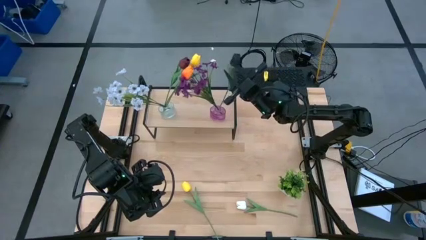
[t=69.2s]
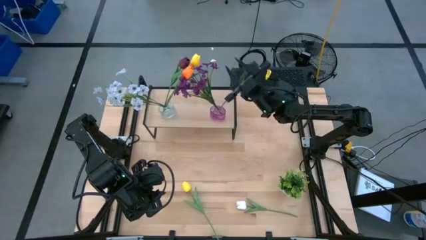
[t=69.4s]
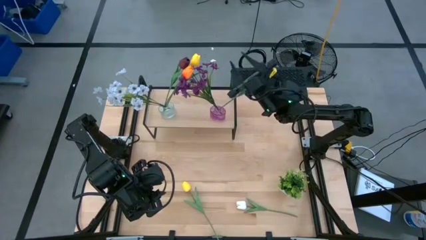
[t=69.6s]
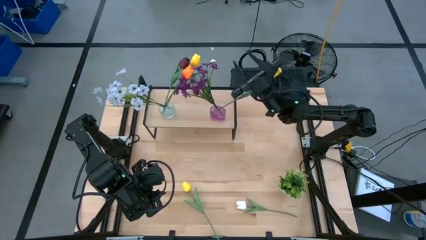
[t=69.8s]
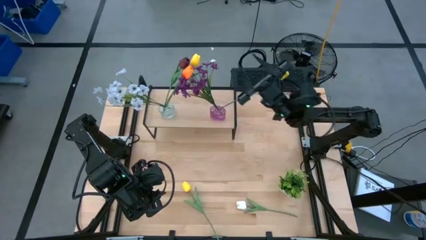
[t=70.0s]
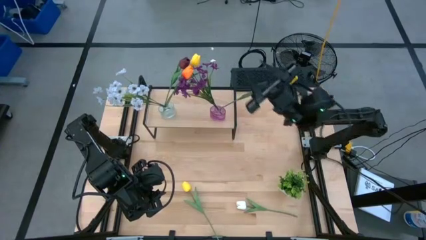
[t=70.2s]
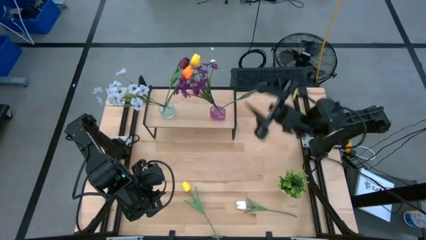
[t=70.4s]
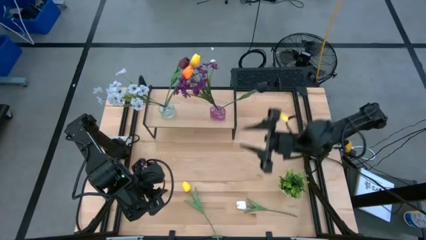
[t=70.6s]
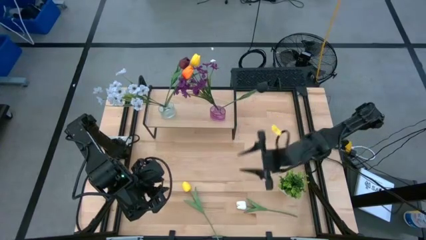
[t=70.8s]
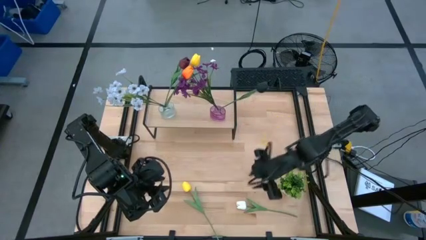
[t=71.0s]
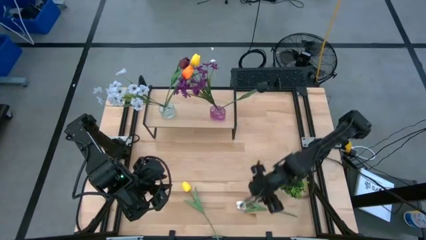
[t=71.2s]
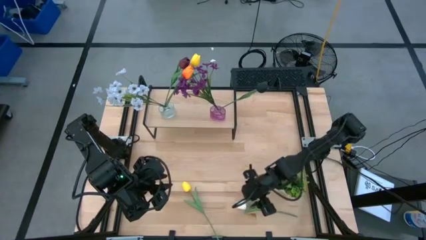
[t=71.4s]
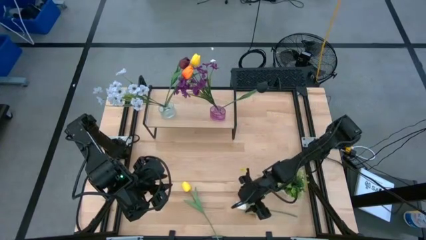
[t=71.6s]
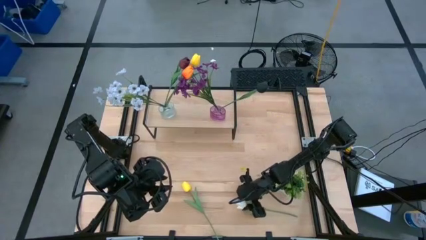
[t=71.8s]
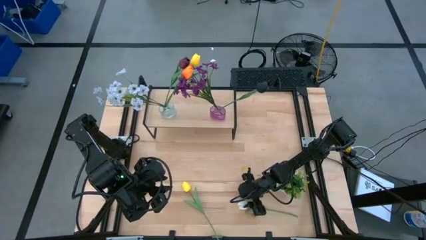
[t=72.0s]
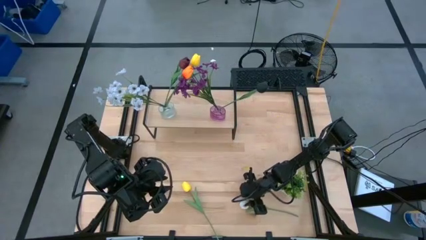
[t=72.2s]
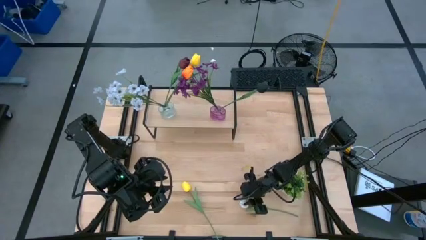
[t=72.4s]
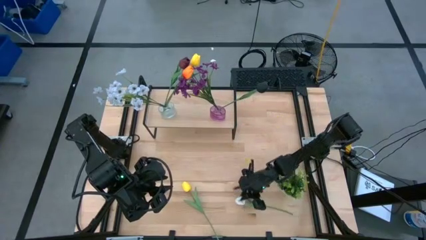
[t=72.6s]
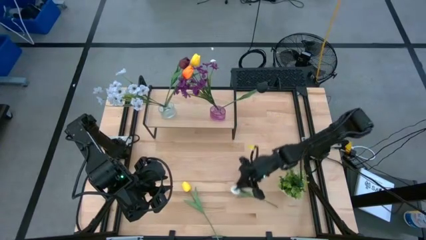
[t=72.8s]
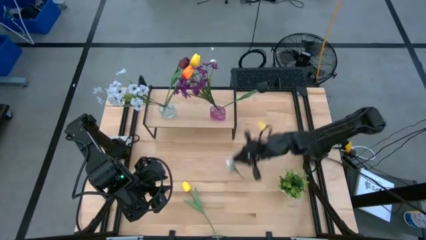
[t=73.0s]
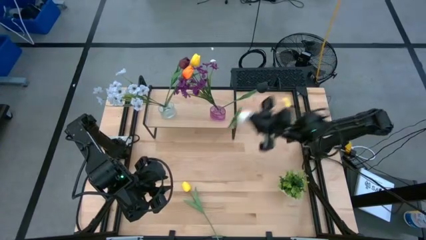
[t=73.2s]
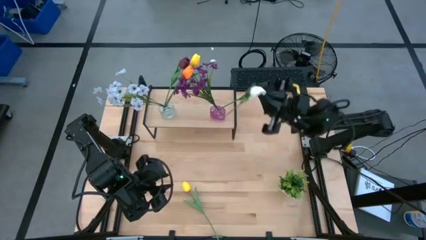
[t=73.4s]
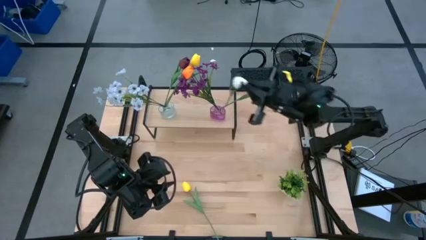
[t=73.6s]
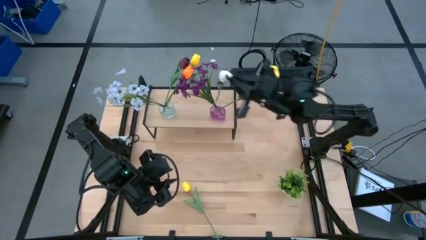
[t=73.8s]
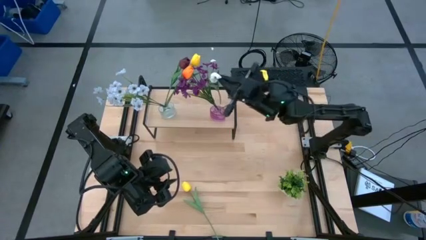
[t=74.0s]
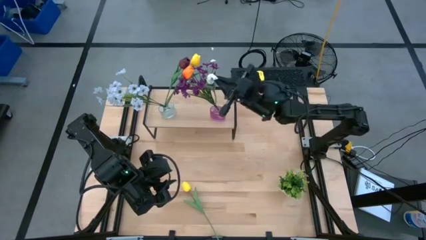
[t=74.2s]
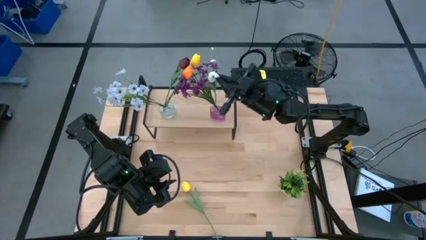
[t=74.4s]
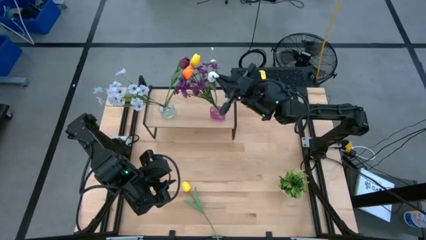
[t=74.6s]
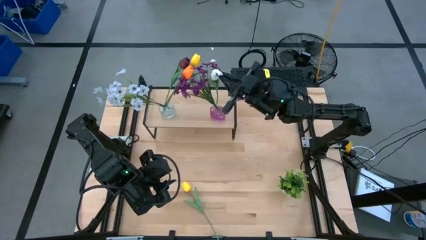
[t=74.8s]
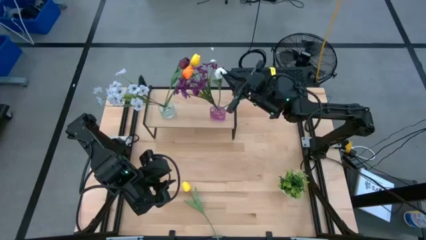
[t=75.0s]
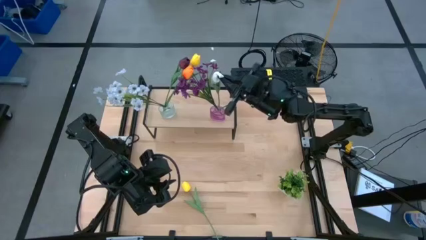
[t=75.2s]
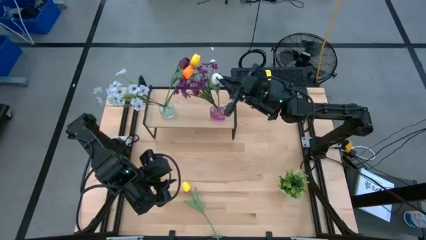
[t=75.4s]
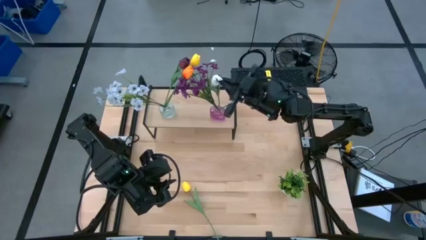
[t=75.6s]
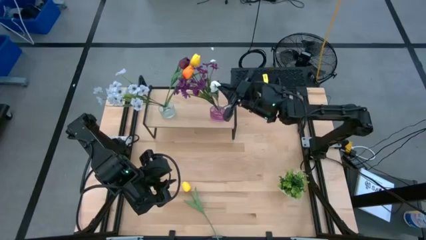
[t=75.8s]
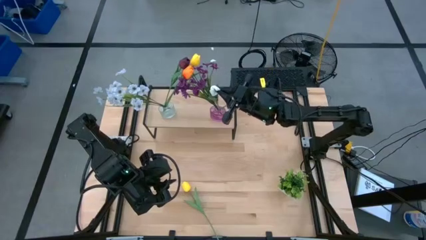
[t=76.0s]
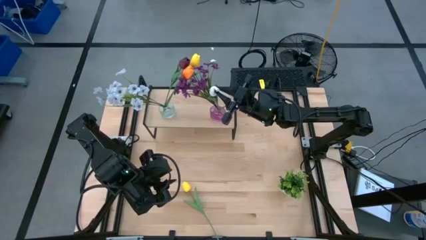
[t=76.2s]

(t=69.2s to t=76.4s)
Task: Pick and place flowers into a vace then onto a shelf
Put the white flower into the violet vase on the shelf

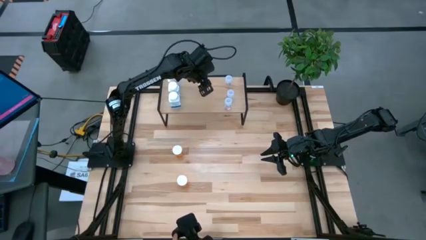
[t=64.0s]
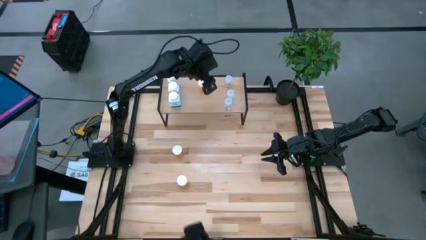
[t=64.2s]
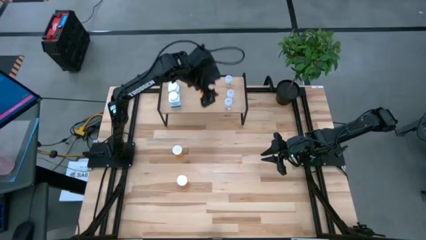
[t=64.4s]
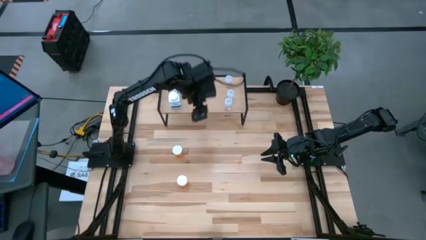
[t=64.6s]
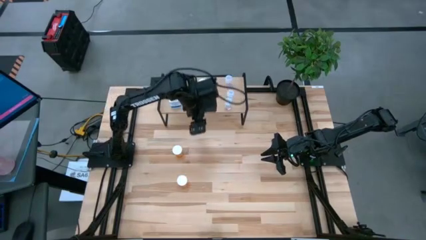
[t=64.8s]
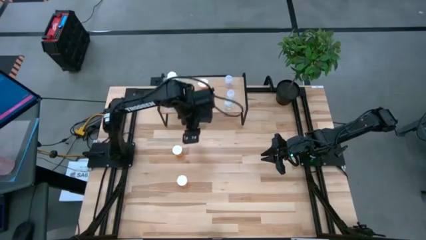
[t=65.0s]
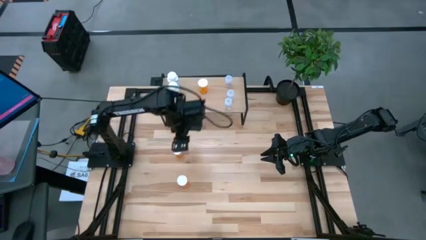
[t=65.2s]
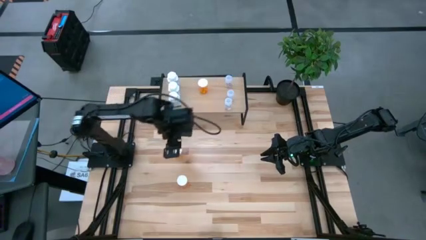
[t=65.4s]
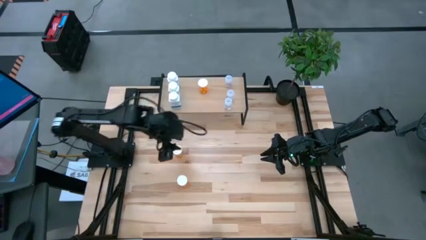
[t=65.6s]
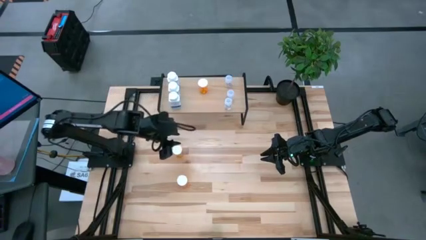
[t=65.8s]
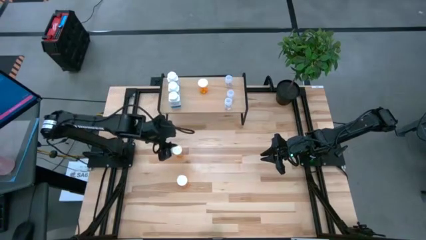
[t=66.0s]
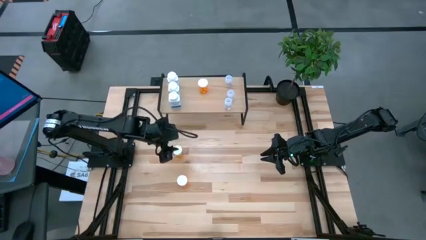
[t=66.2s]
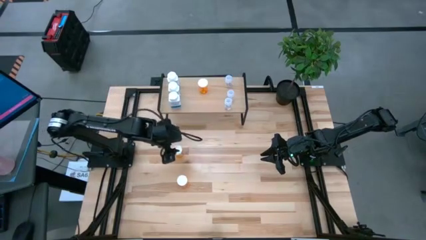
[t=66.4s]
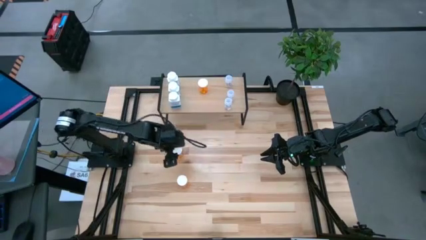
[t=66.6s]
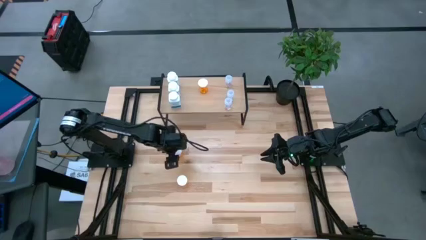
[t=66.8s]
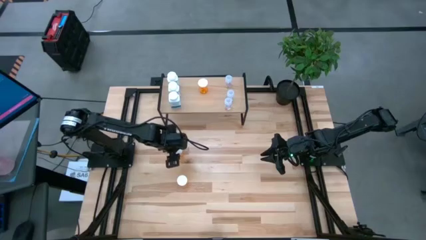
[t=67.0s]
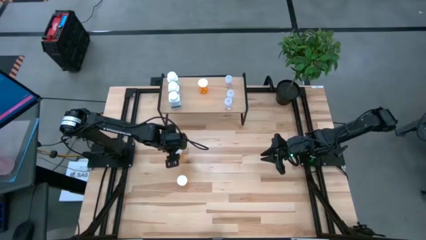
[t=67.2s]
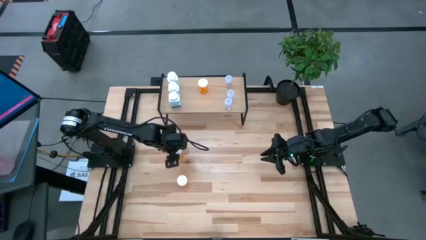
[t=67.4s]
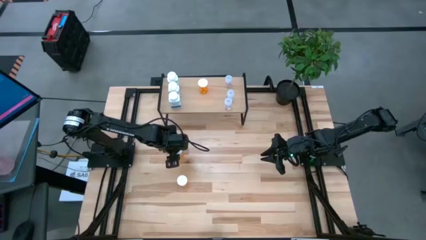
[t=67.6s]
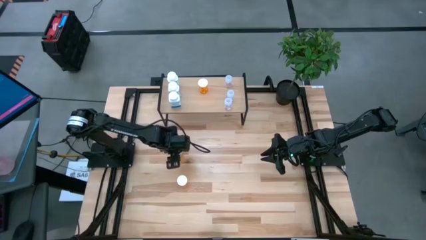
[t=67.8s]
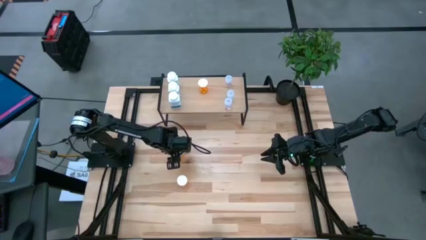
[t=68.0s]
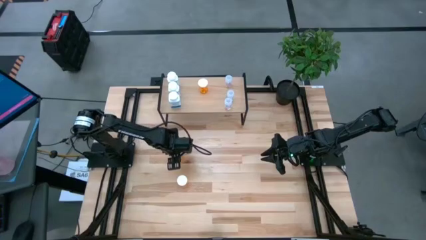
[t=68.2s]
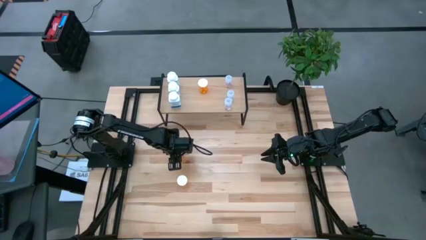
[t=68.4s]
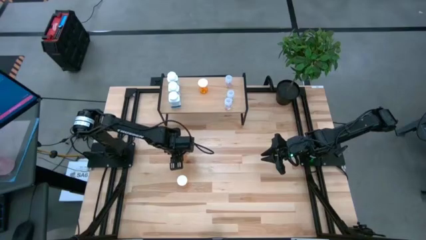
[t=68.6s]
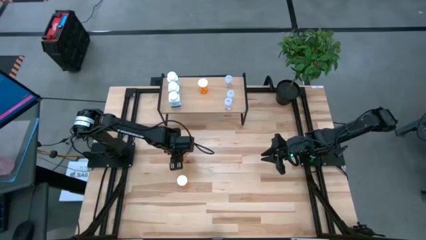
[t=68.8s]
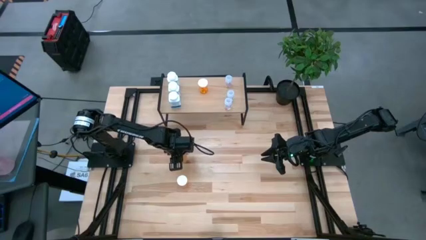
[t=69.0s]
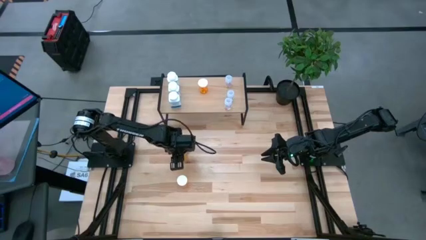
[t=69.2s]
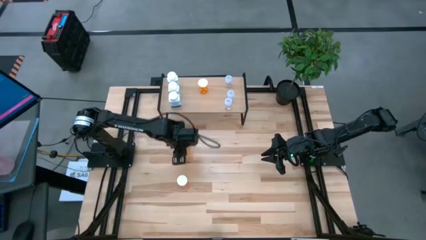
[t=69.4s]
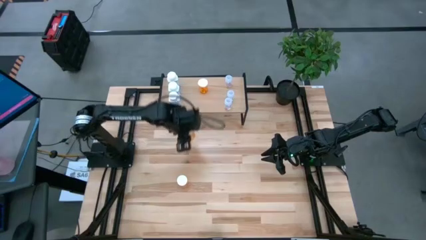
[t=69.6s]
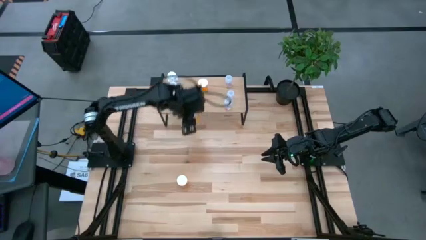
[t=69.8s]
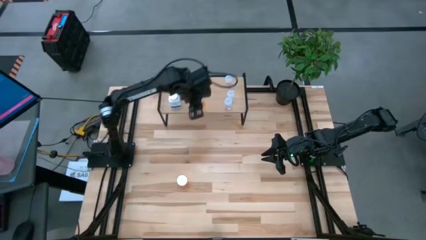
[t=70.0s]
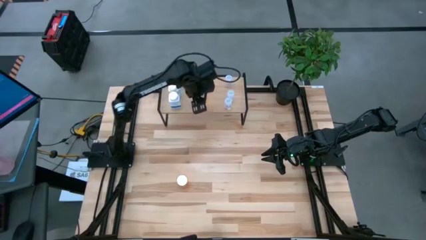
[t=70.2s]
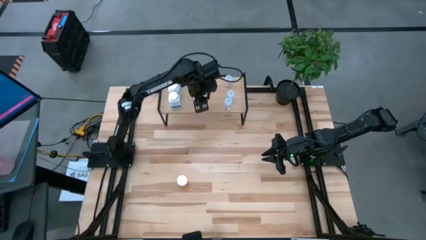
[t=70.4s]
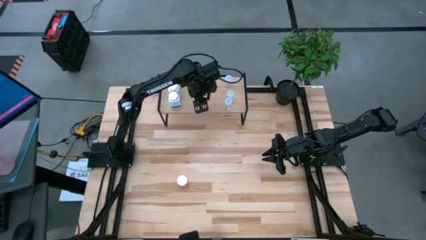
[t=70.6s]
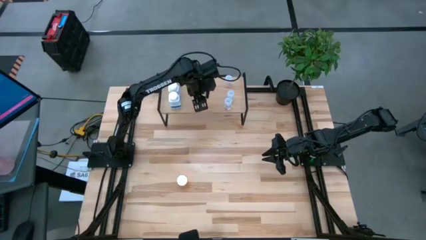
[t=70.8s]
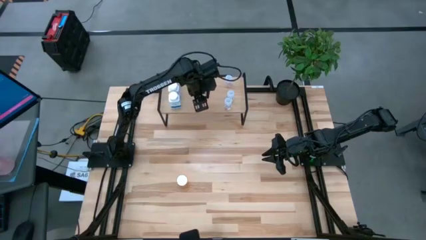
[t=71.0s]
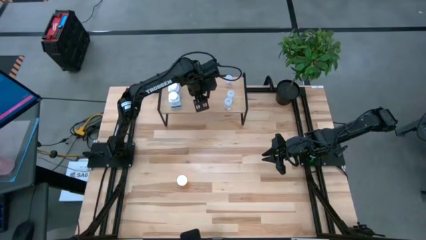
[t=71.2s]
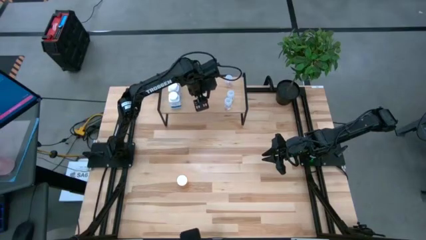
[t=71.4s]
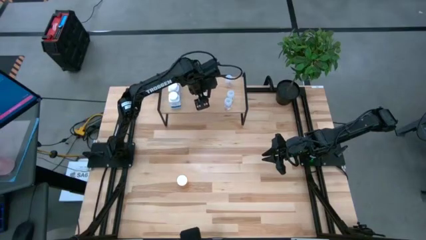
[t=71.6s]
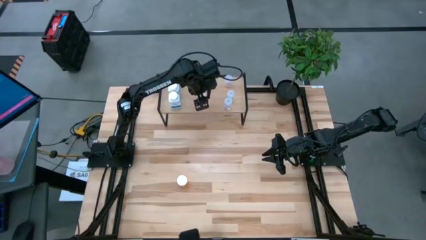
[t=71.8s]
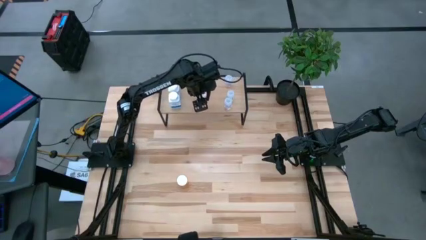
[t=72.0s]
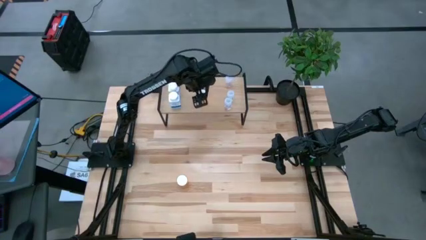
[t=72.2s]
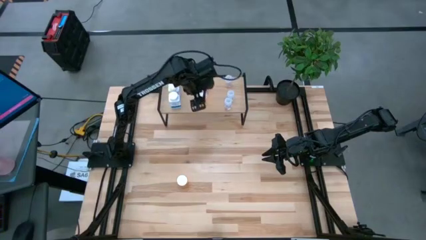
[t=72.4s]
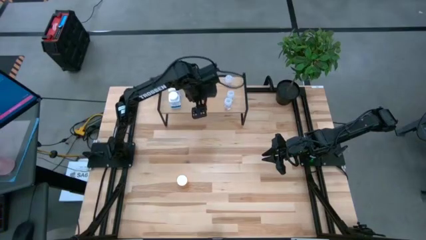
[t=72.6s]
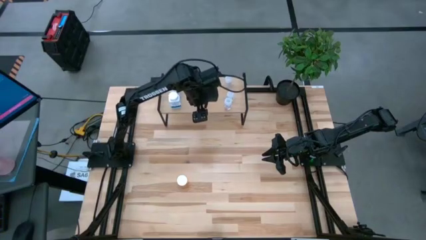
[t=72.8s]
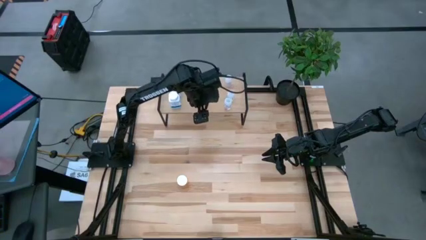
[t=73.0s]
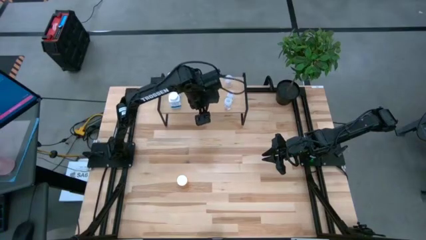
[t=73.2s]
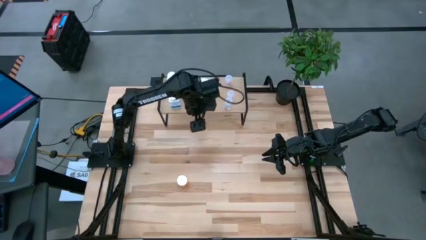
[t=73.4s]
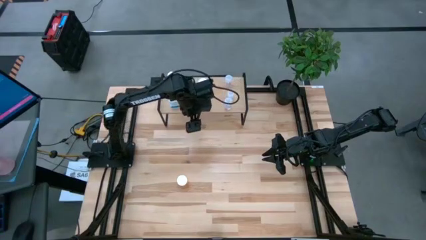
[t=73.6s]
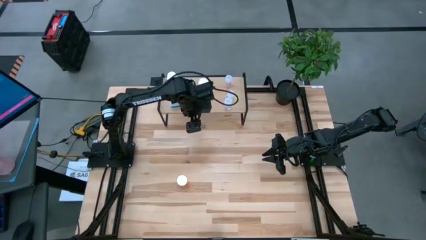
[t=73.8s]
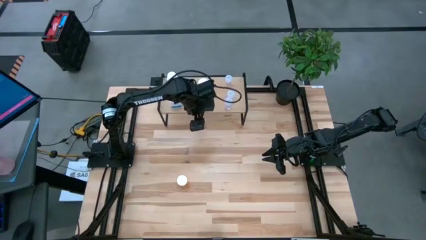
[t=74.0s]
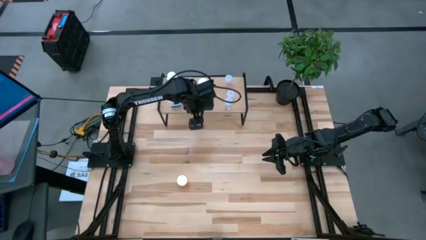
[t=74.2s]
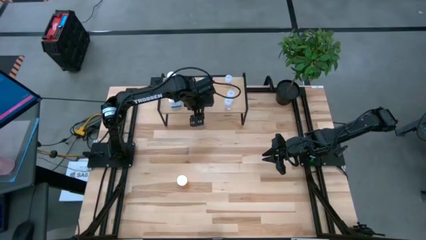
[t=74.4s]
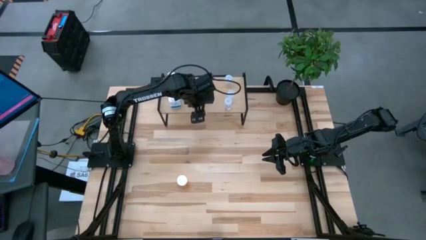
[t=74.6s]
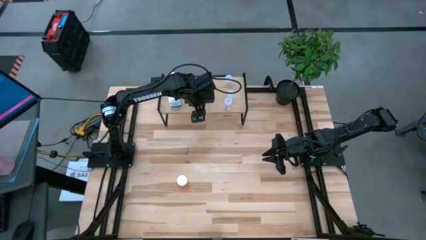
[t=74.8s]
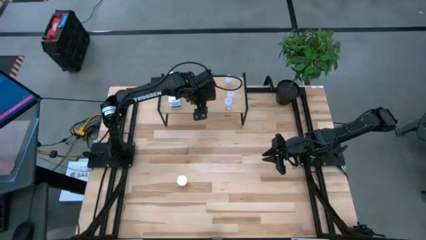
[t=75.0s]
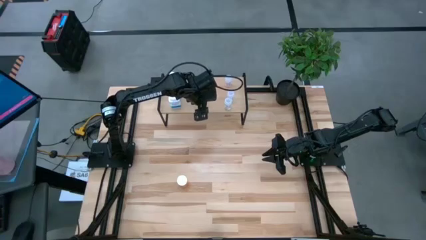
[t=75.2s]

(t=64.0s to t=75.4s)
Task: Pick and place medicine bottles onto shelf by color
Put the top orange pill bottle on the shelf aligned with the other orange pill bottle
